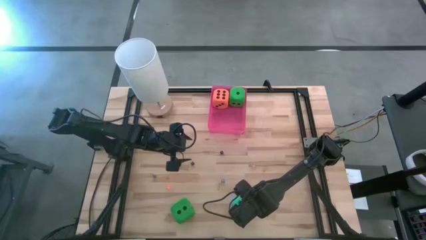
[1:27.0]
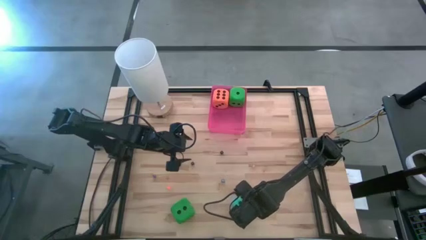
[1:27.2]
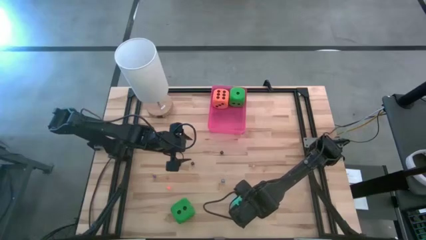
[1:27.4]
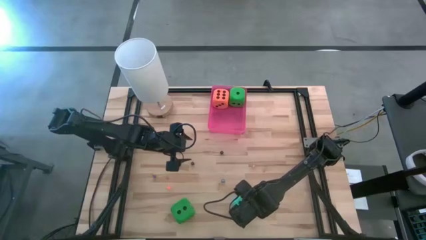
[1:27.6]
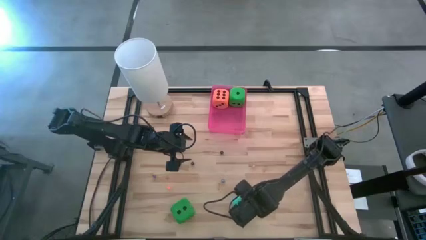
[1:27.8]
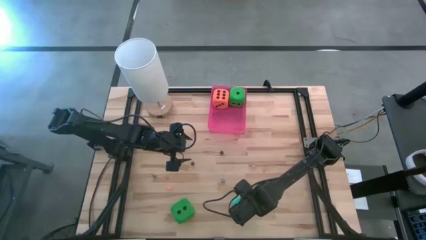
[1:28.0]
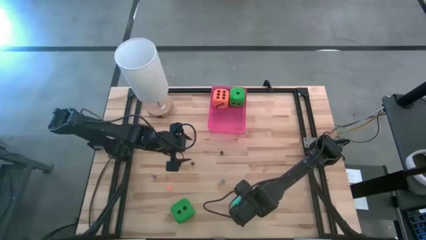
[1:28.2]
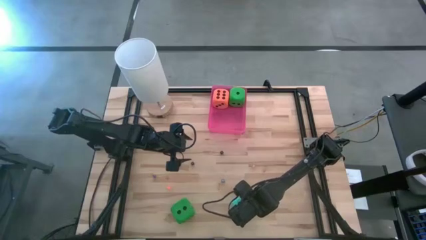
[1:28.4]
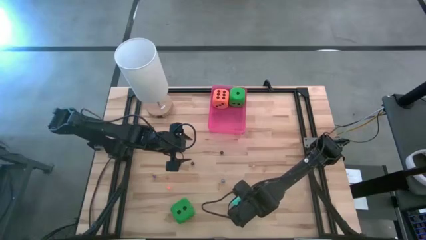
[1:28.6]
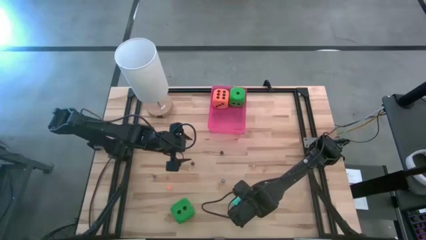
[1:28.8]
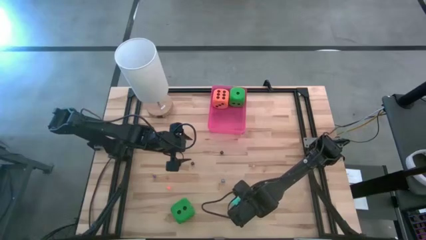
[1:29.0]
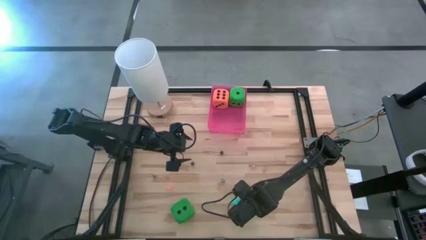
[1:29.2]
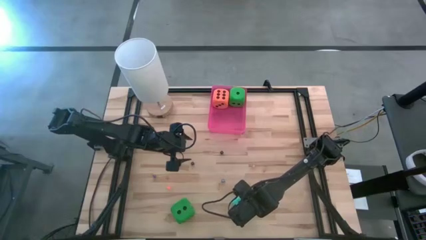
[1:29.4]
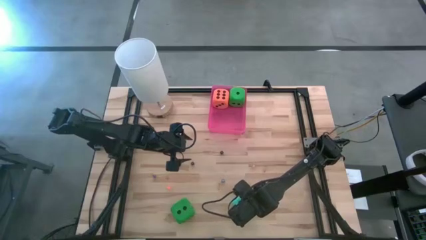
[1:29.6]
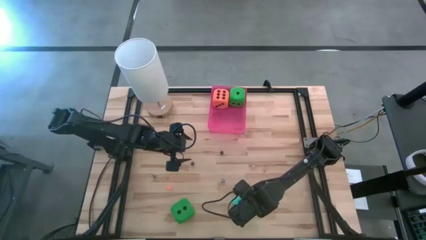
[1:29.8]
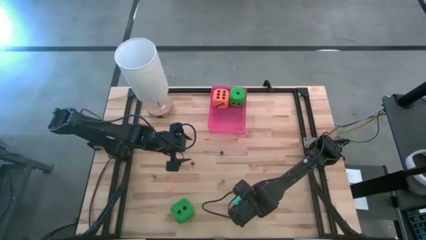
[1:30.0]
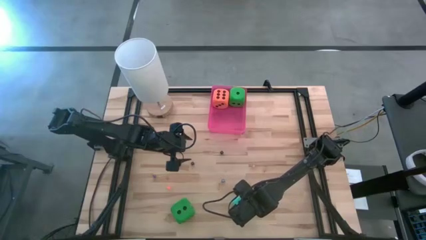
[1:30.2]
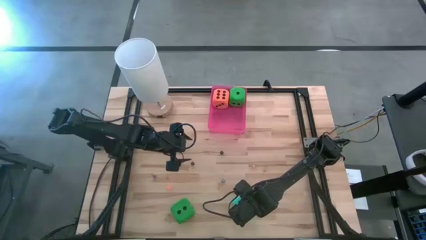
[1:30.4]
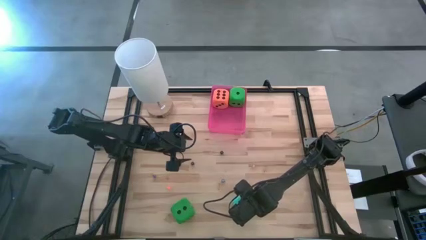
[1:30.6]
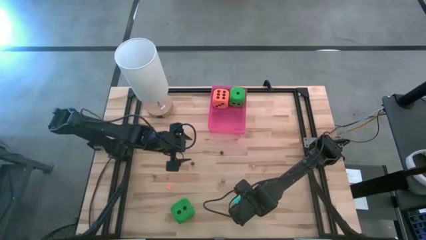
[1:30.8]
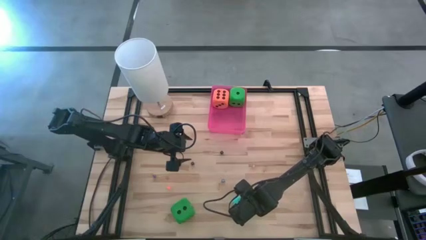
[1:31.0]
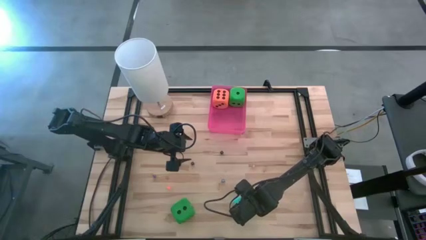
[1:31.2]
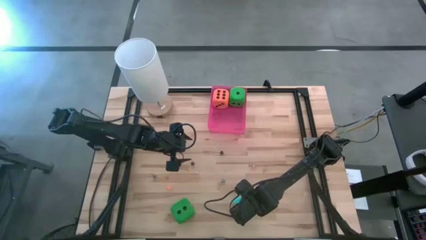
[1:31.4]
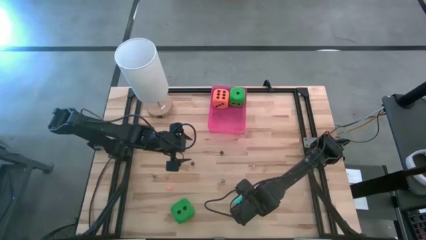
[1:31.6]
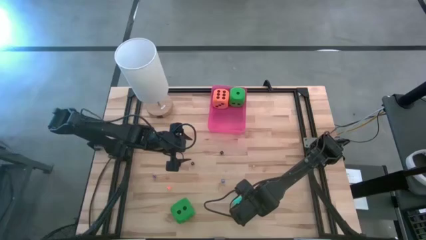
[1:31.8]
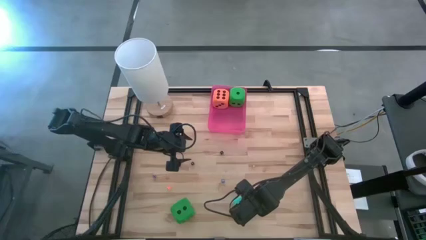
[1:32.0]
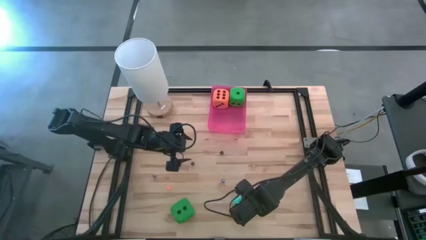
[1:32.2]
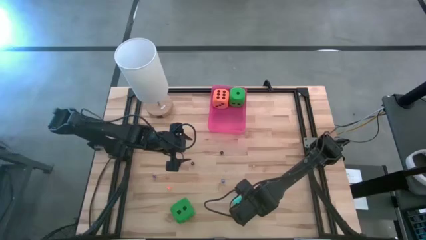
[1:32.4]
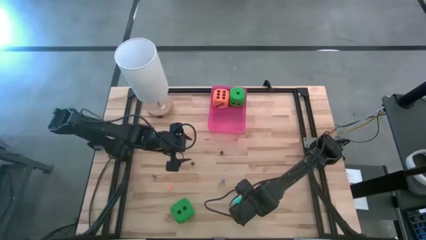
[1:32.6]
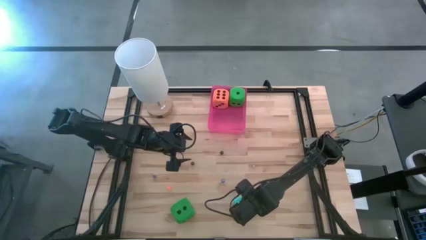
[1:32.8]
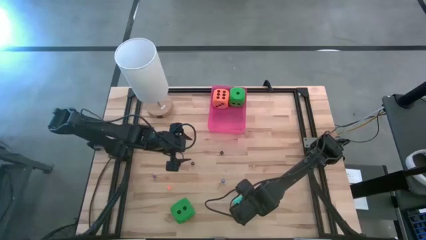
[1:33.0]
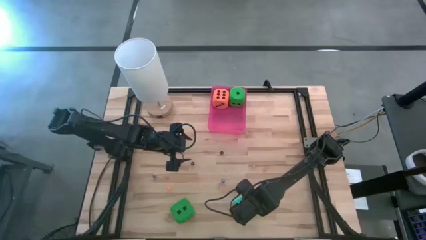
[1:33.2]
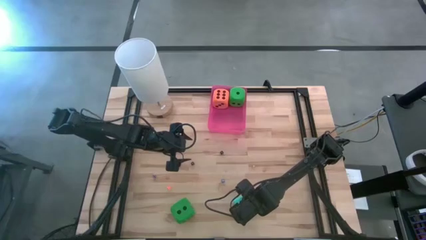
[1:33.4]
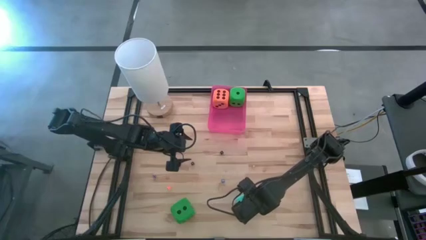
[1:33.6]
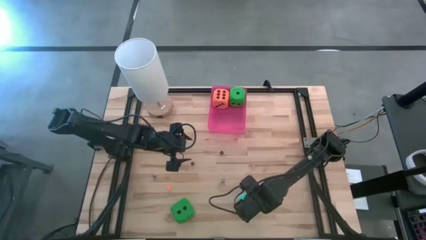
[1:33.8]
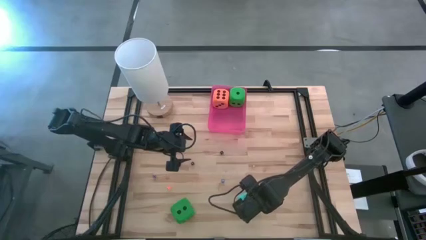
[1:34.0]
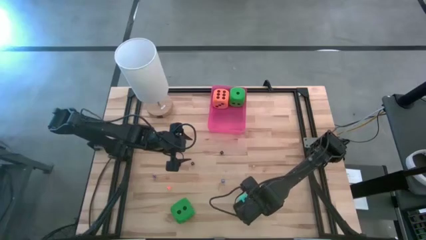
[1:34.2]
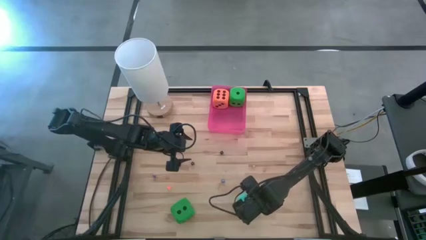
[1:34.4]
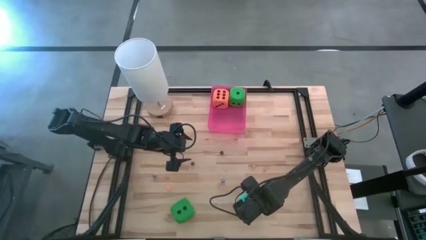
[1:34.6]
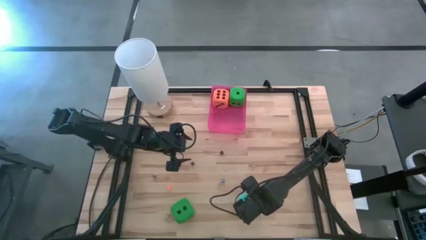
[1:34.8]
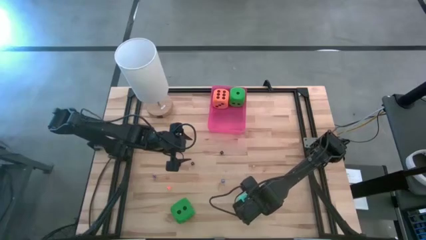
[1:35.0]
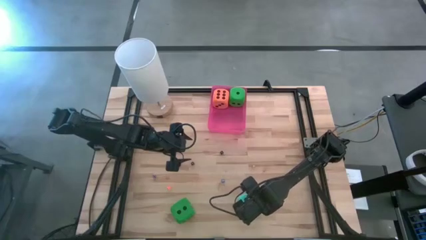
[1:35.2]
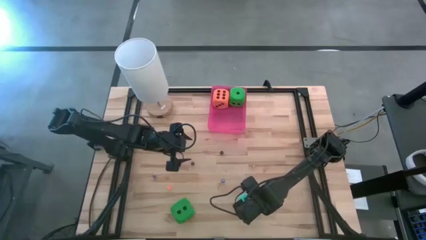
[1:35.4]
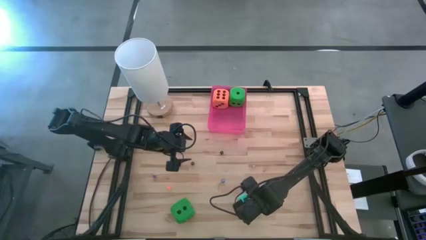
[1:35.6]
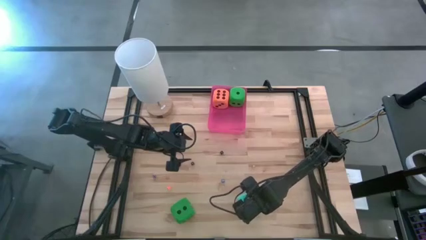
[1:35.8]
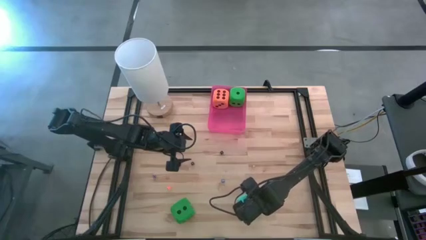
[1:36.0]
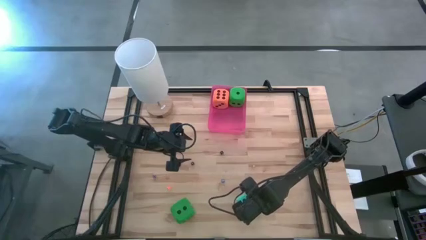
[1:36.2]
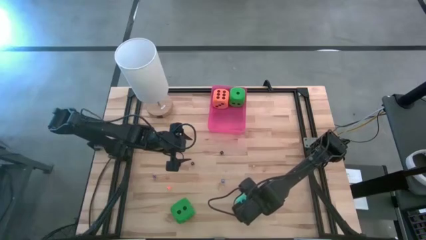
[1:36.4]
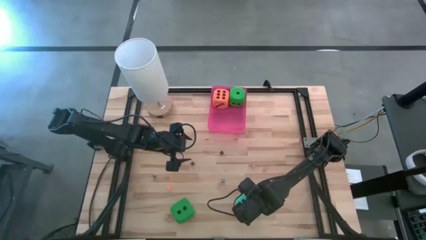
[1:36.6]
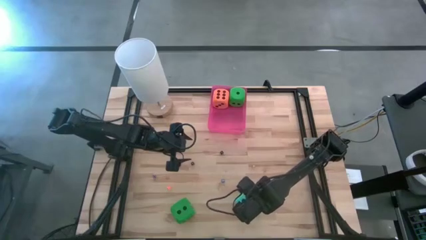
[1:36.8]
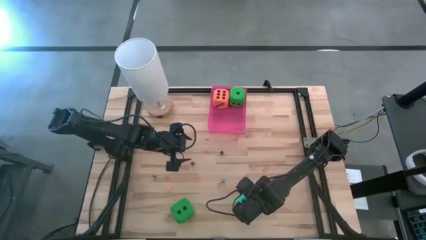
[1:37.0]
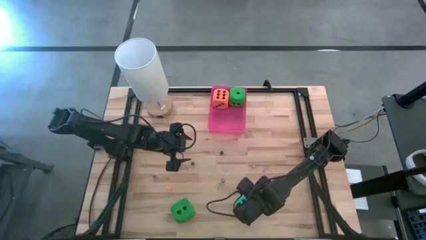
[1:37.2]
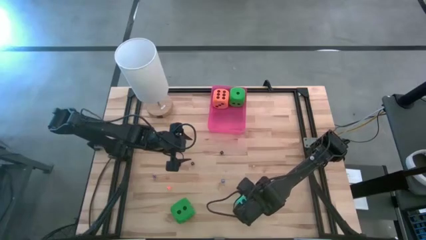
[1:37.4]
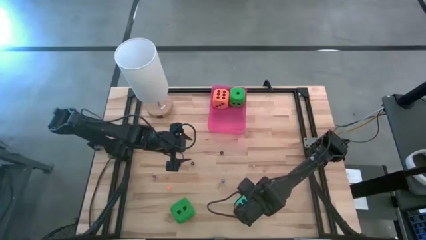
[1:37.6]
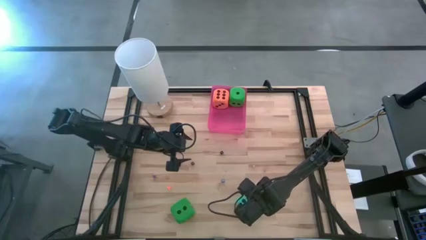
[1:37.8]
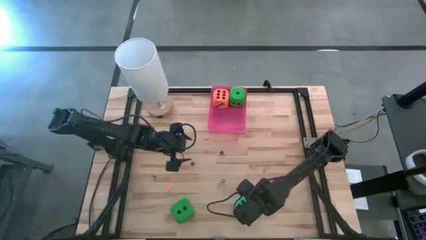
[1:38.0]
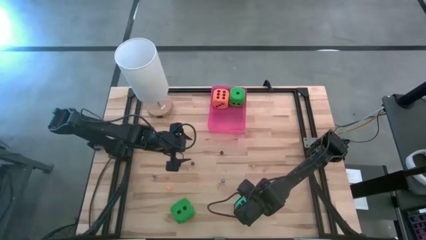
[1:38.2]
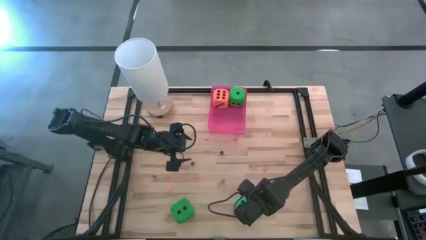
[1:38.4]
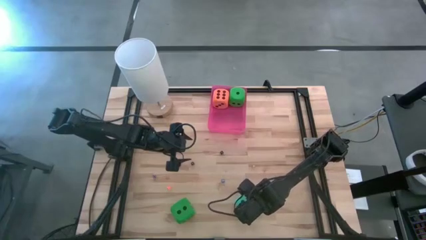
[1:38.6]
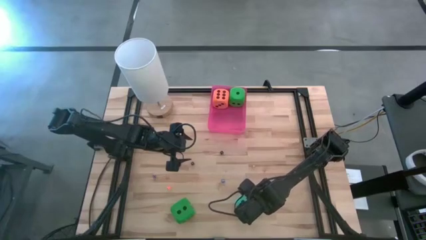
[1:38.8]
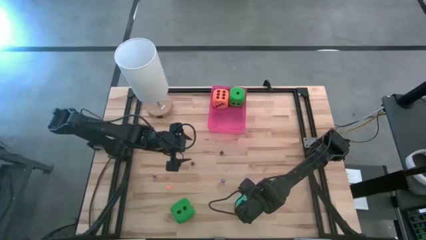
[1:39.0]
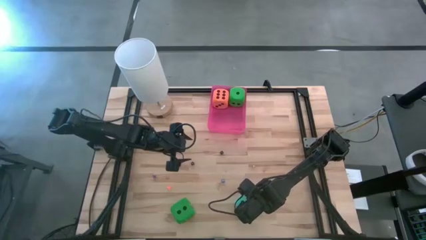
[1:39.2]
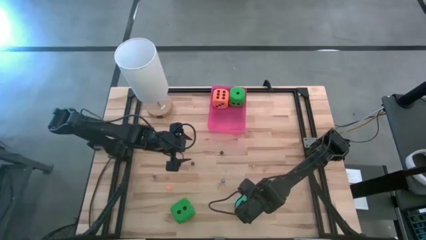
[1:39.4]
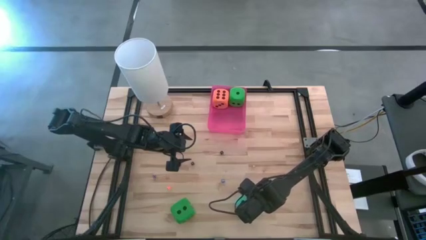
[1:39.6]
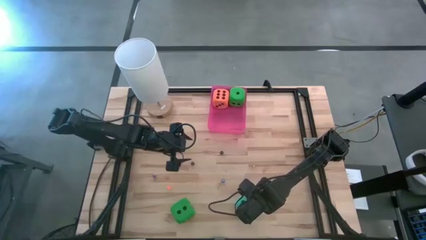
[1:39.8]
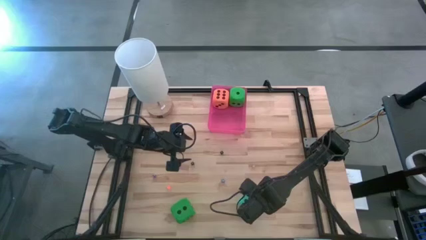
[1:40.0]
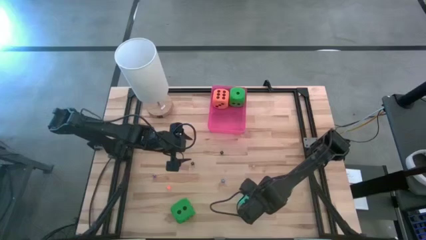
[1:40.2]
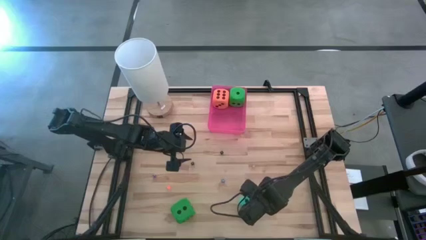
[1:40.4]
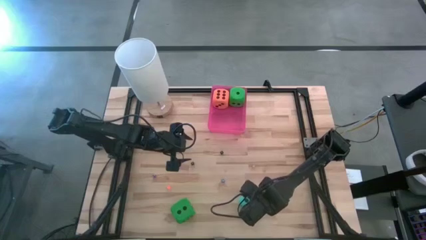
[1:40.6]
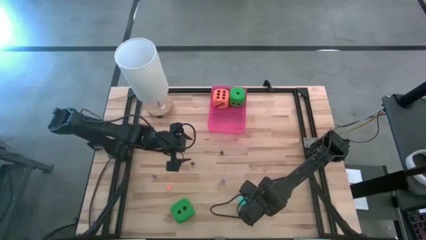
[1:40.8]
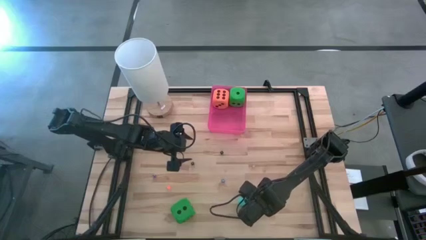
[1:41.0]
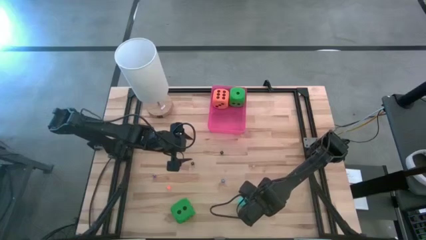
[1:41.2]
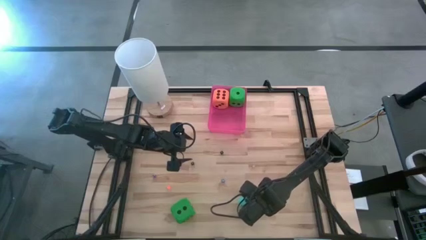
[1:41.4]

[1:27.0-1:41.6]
Task: Pick & Place Dice
Put the big blue dice into the red container
